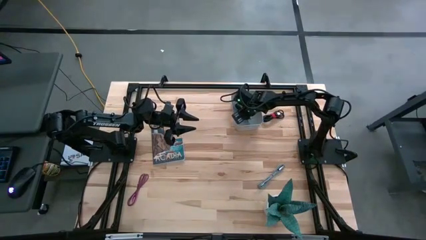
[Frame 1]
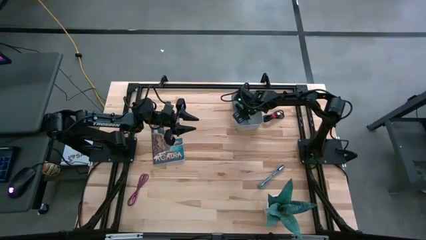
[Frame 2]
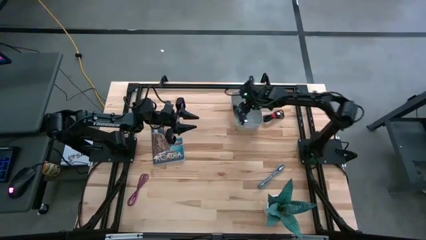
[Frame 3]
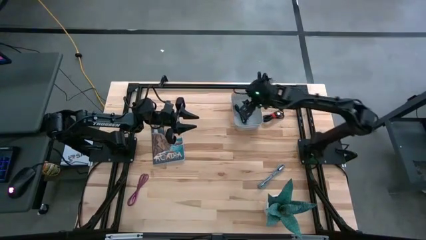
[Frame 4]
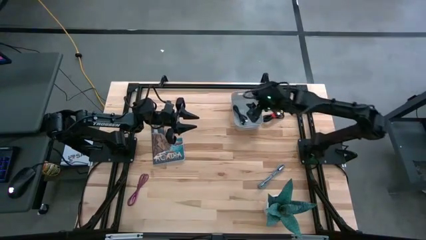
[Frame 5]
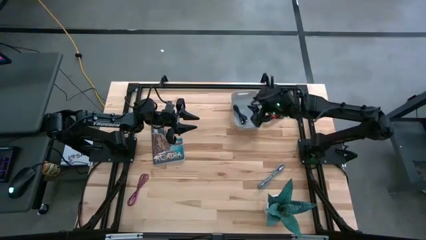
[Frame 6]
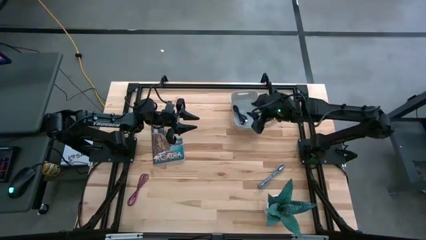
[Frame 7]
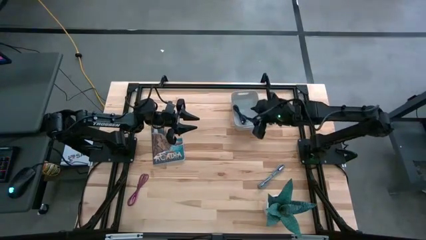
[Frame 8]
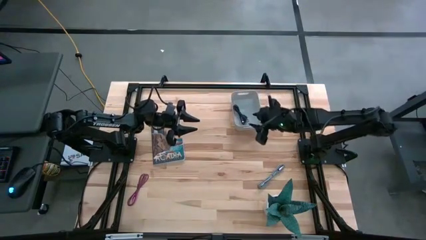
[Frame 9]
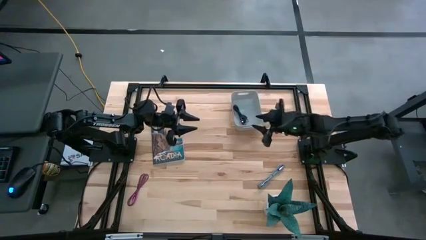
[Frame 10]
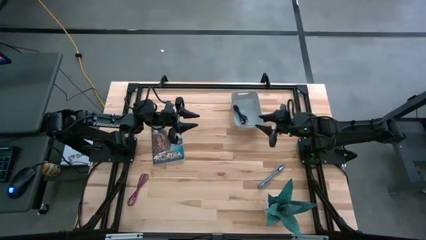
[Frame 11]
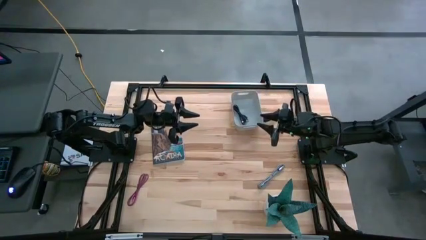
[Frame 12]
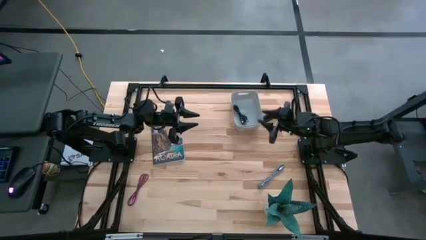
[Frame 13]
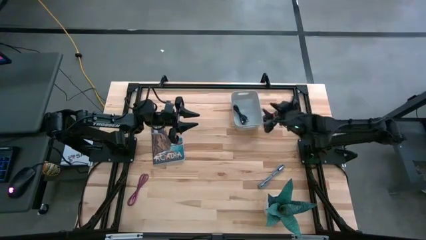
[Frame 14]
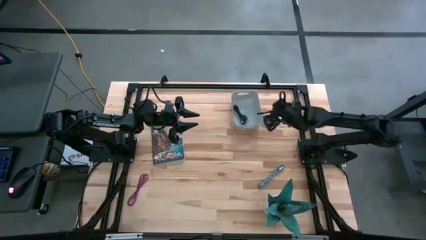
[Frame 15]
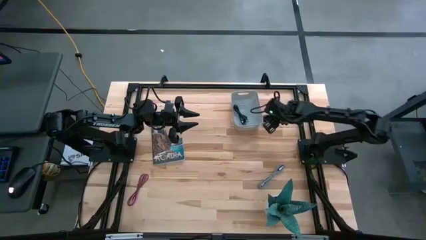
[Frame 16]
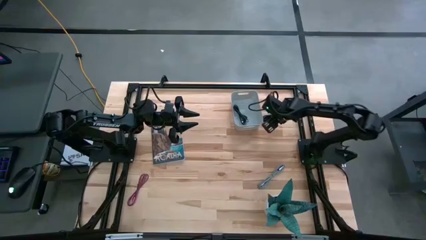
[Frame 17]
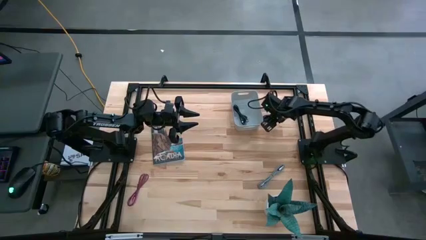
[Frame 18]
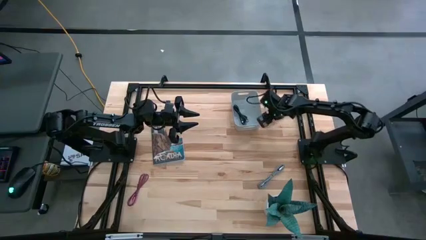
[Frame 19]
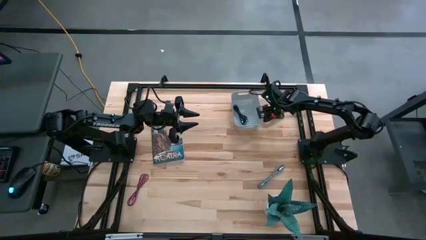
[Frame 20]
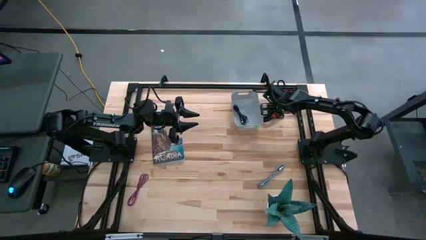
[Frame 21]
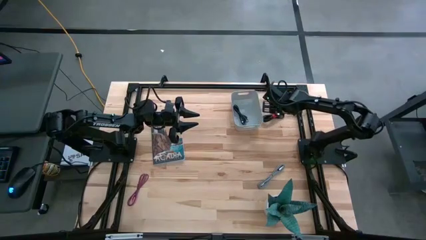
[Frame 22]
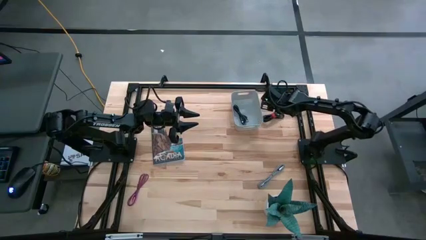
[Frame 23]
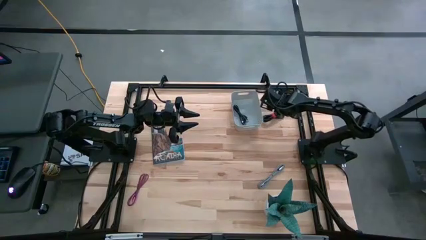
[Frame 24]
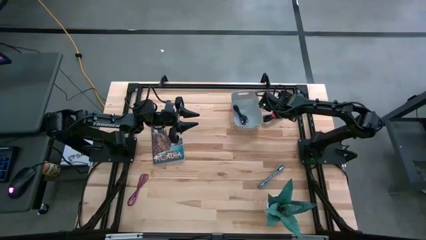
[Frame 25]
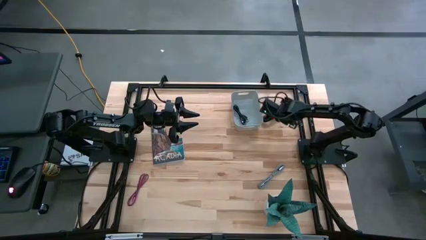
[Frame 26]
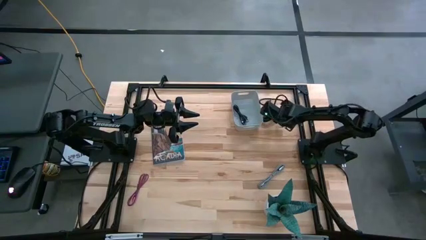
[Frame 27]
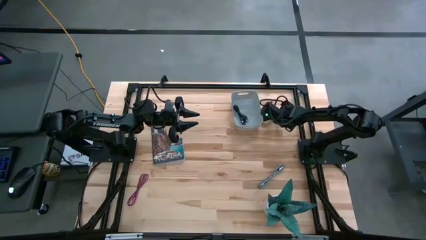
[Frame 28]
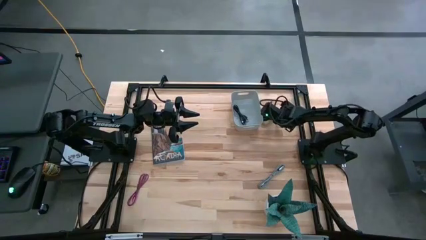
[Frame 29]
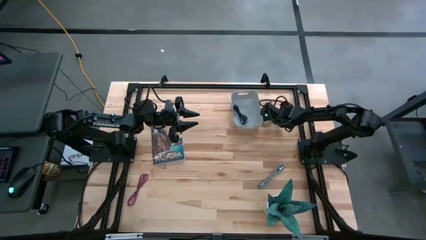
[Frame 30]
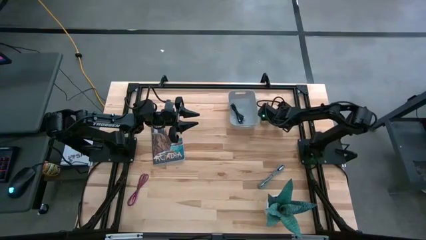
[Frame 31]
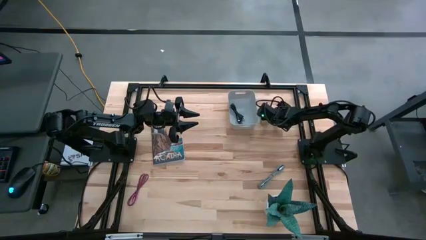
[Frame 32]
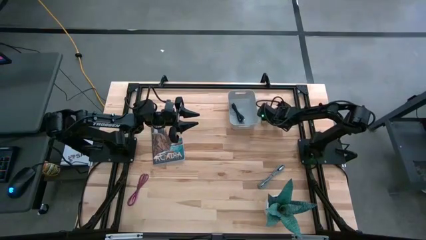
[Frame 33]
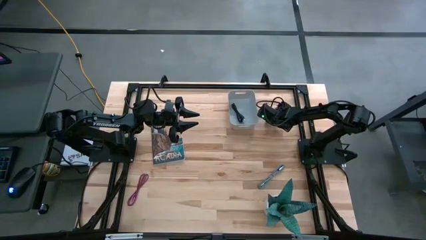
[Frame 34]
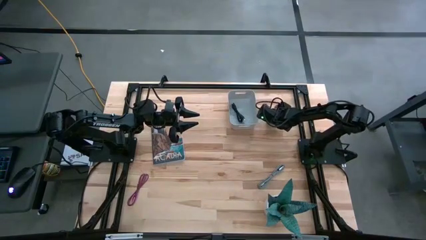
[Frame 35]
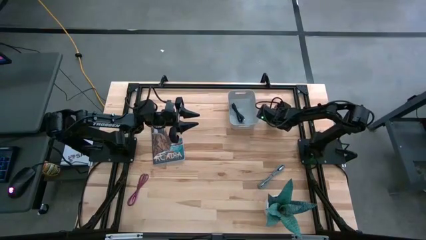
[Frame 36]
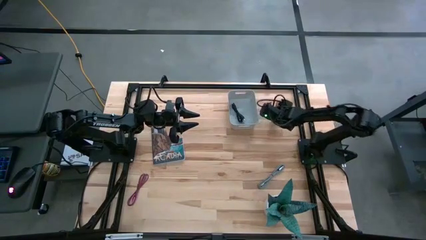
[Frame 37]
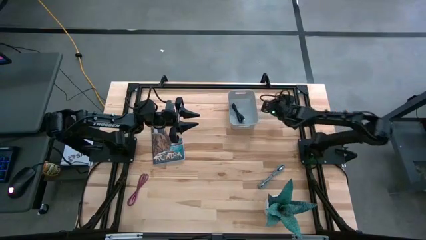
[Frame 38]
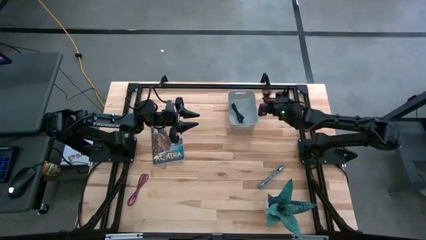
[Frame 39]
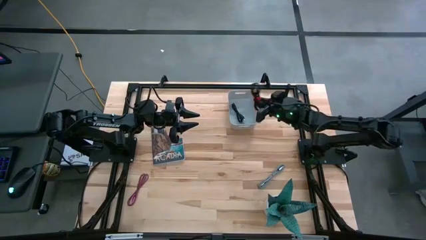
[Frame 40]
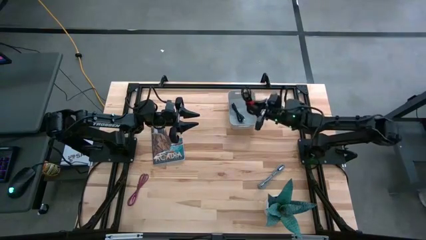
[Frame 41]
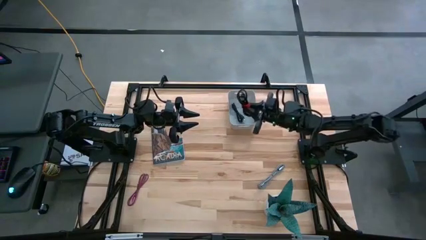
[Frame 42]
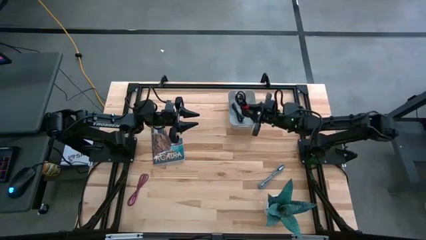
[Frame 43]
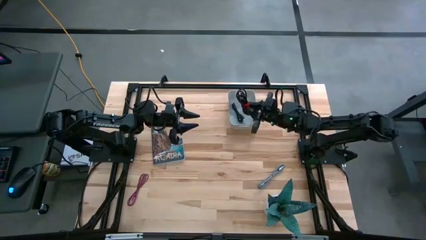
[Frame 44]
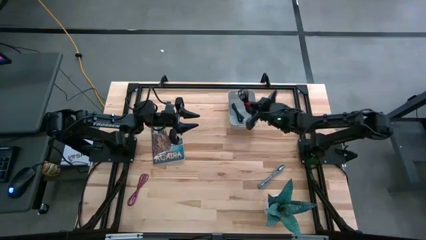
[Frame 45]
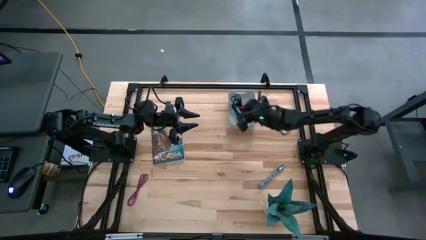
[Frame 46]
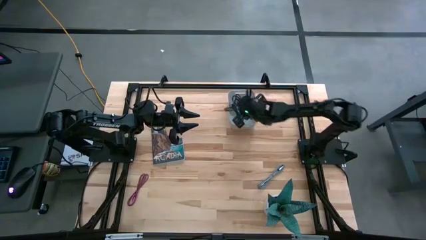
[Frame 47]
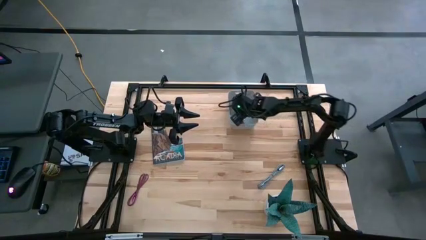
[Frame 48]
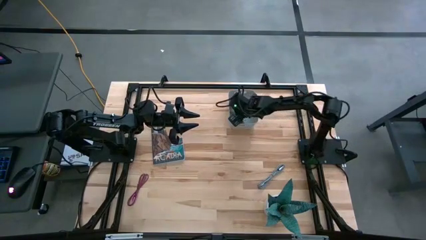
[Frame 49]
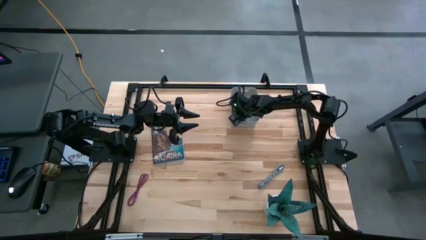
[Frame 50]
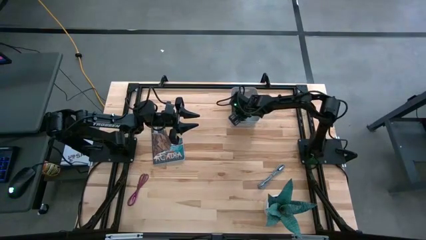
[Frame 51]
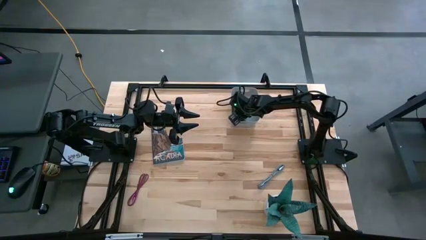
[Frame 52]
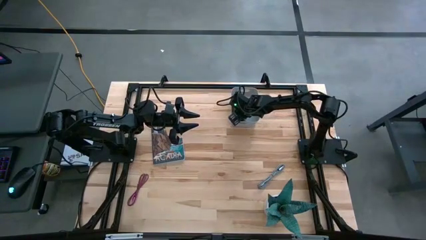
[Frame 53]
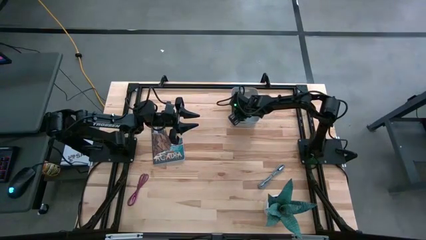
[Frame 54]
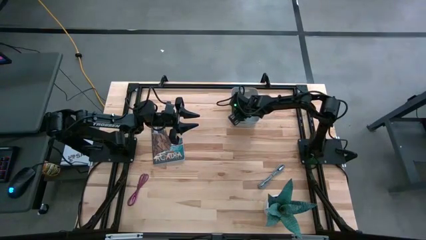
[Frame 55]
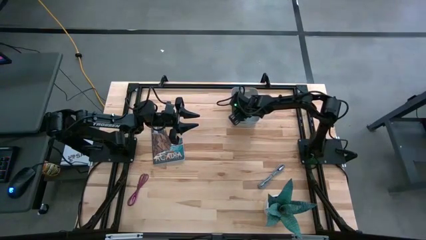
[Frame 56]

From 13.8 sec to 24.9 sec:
Task: Pick and place USB-C Cables
Put the black usb cable into the white bin

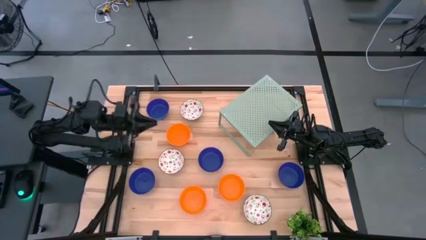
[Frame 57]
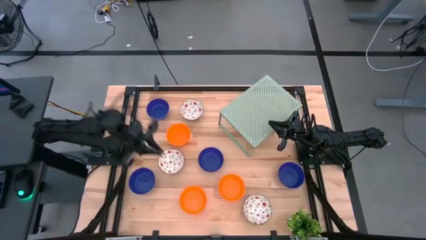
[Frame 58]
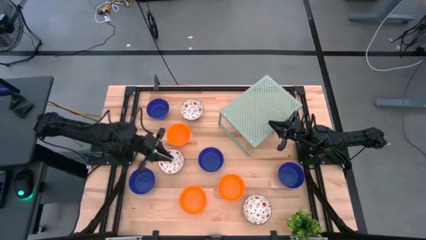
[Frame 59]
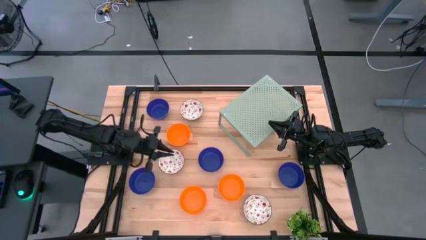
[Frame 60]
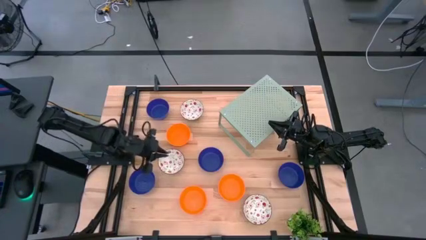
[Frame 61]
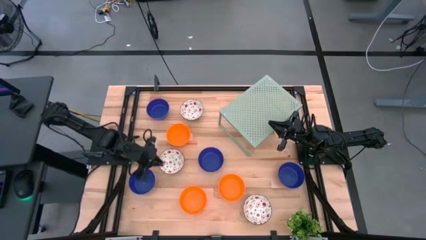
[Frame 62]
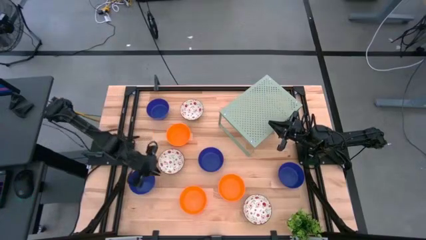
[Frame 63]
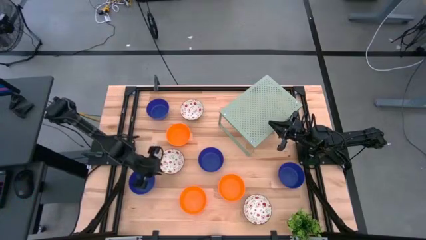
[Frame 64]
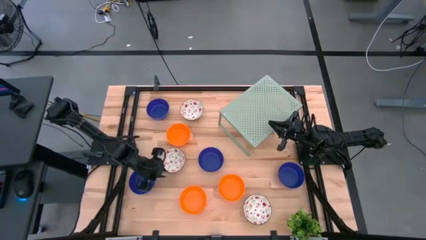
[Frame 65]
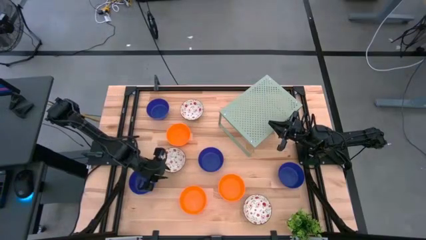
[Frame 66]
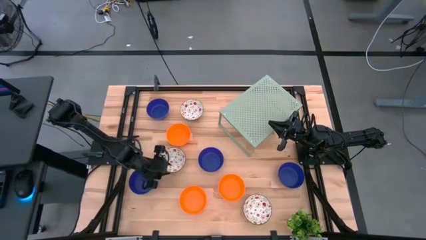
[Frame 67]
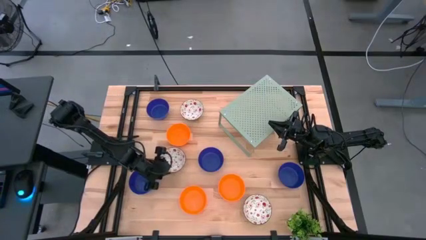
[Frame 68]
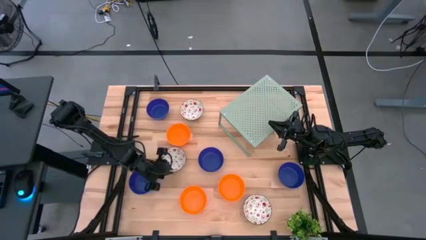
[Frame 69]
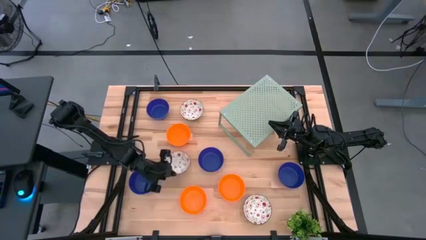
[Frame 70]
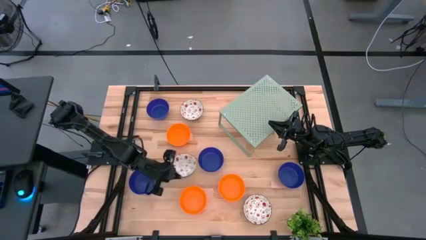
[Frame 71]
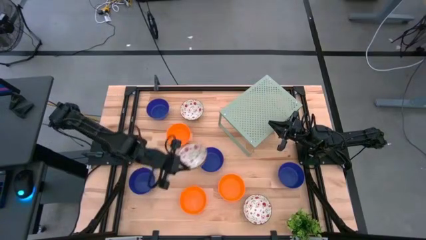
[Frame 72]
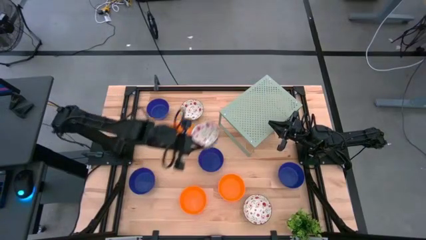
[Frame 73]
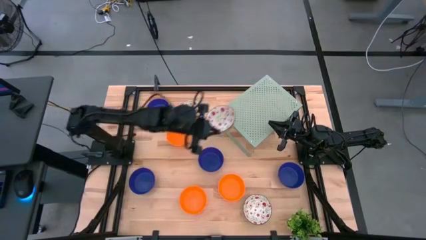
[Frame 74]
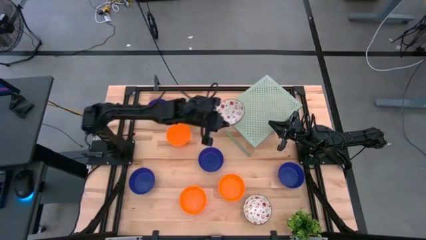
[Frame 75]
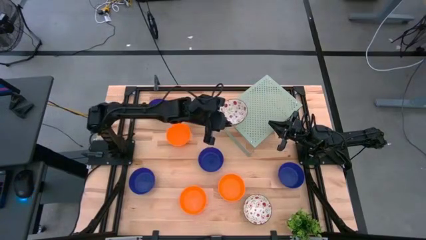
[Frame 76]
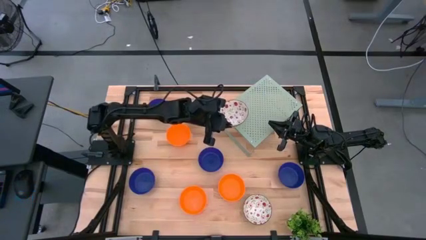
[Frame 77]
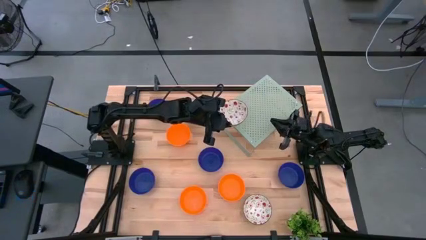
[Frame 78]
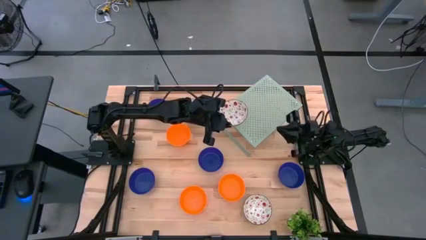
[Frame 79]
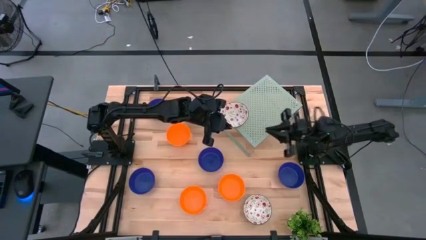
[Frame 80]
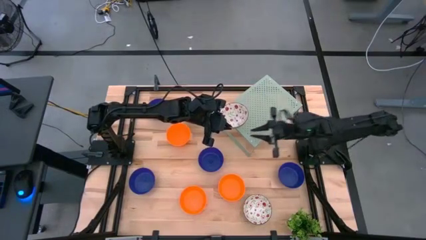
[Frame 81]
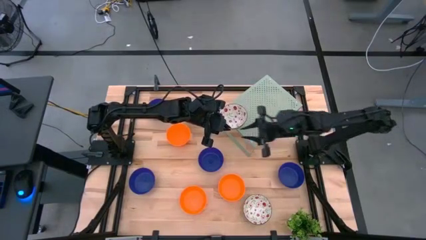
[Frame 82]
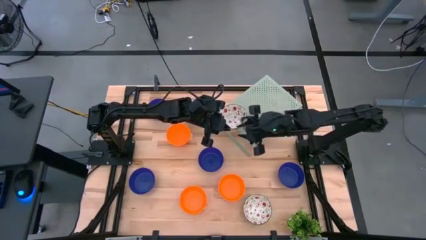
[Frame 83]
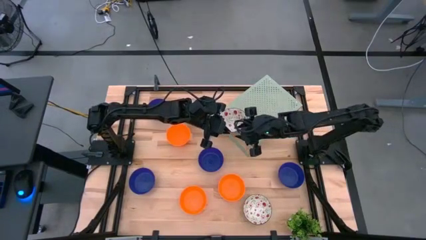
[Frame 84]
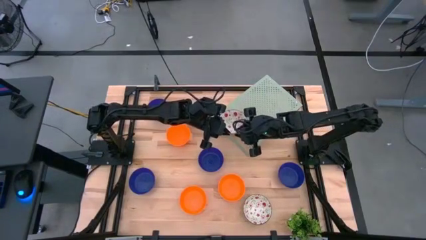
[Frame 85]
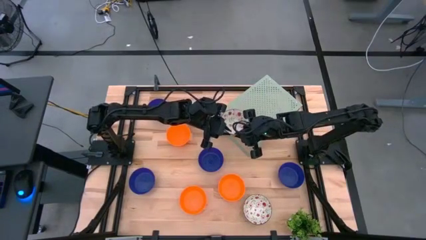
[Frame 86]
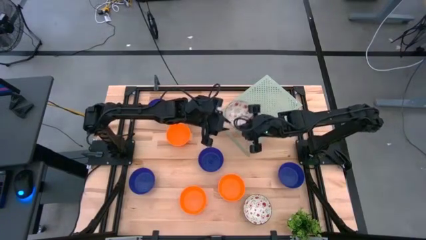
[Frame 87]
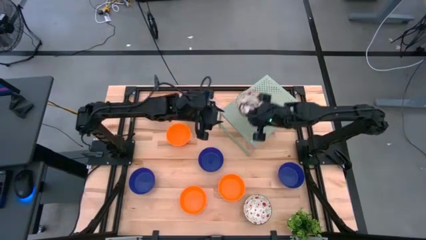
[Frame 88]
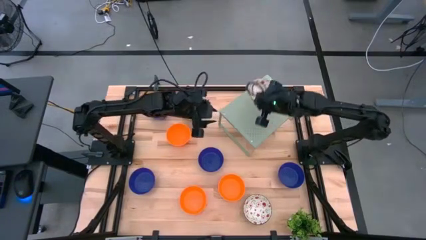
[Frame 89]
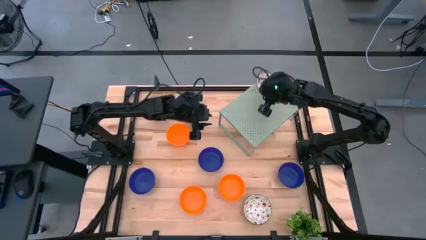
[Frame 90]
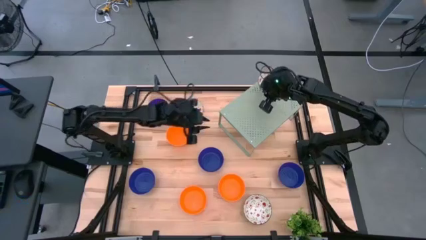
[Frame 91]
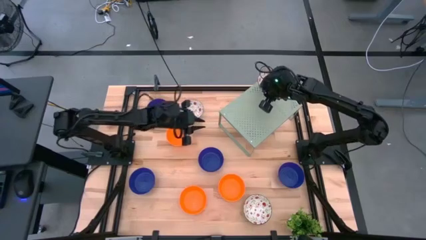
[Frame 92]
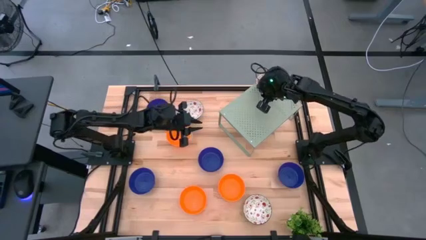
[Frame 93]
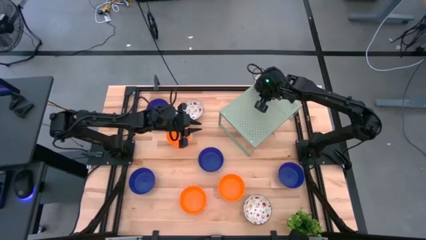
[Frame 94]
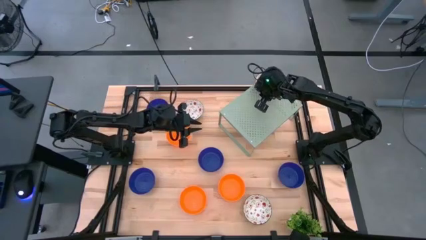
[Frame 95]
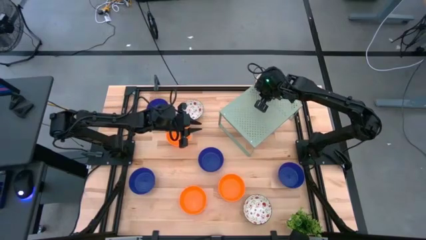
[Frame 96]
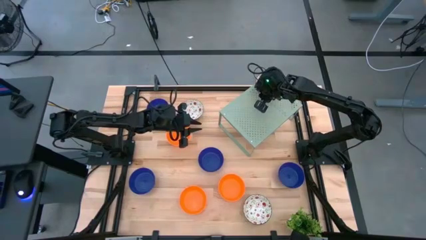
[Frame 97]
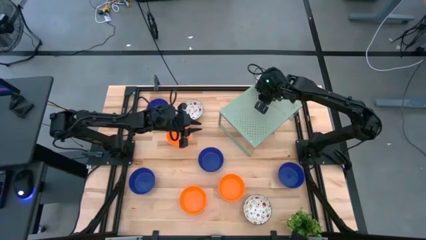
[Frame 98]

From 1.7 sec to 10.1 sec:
Task: Pick & Place Mini bowls
Put the white patterned bowl on the shelf
